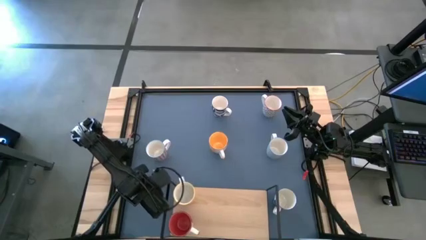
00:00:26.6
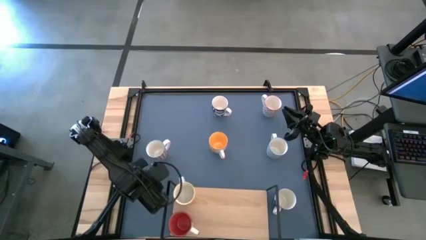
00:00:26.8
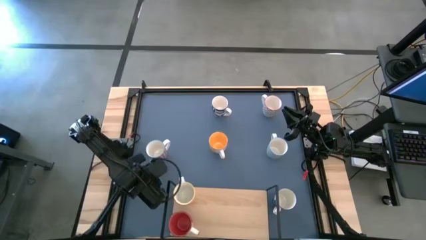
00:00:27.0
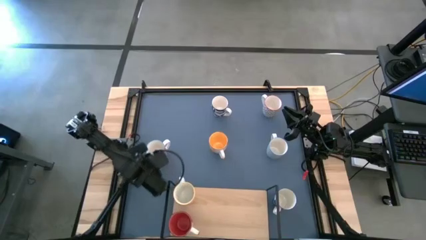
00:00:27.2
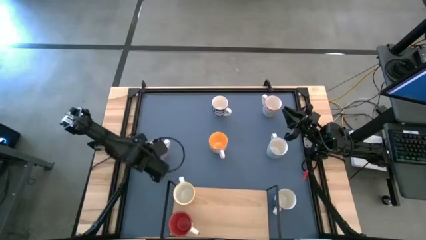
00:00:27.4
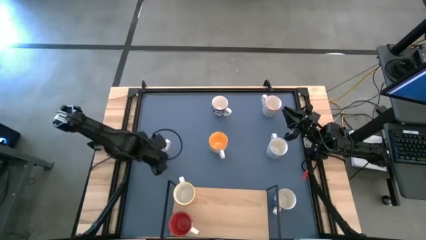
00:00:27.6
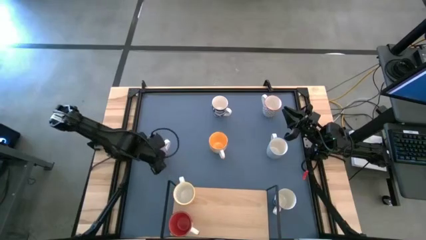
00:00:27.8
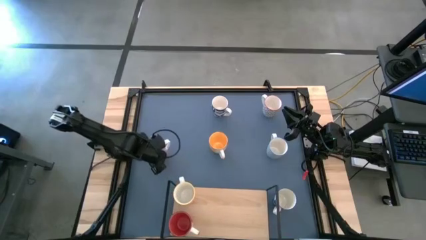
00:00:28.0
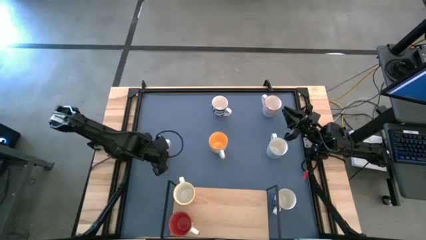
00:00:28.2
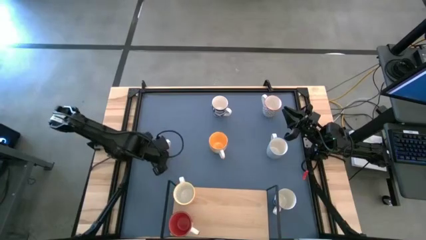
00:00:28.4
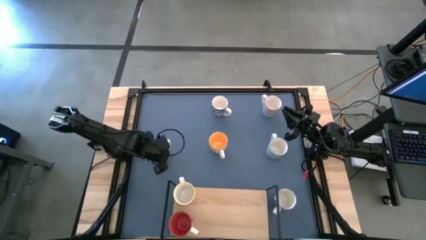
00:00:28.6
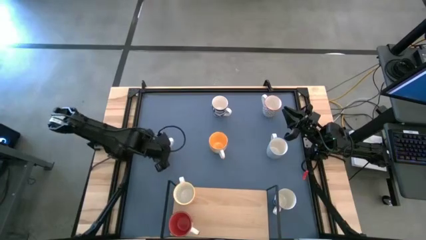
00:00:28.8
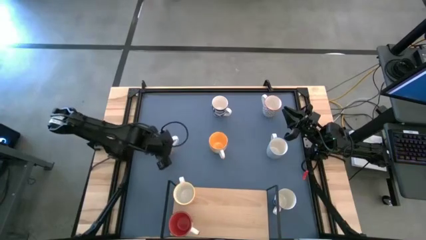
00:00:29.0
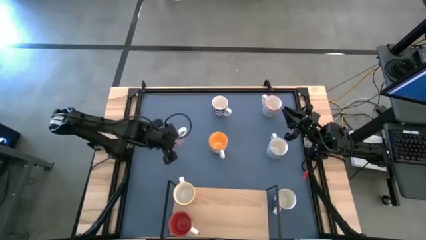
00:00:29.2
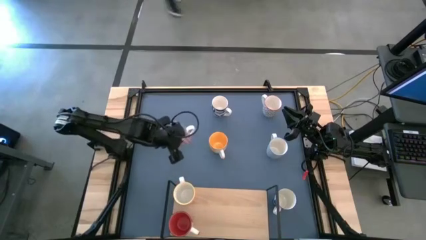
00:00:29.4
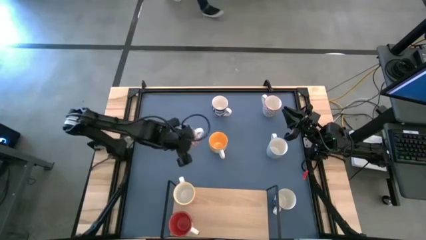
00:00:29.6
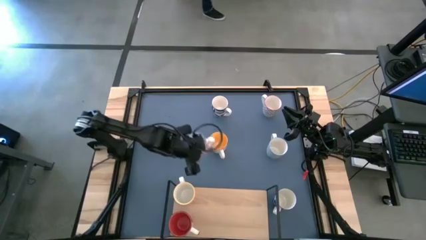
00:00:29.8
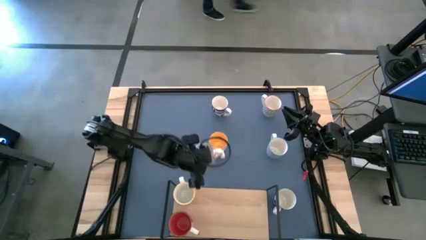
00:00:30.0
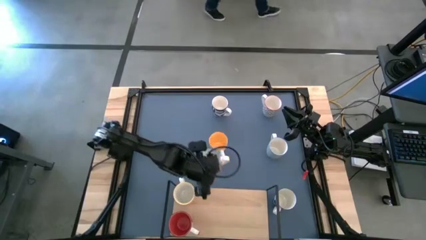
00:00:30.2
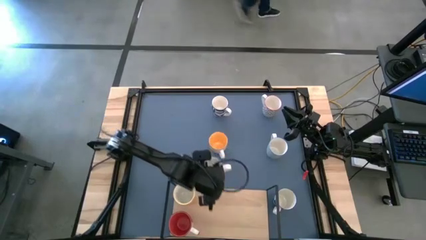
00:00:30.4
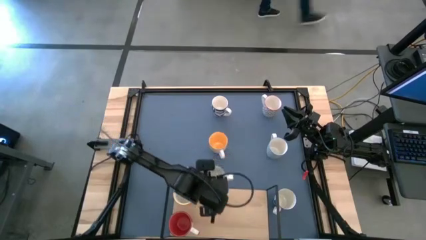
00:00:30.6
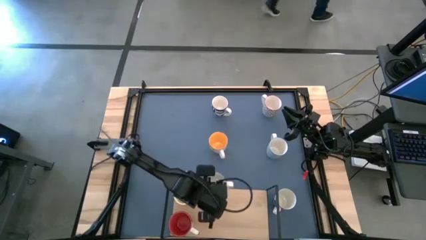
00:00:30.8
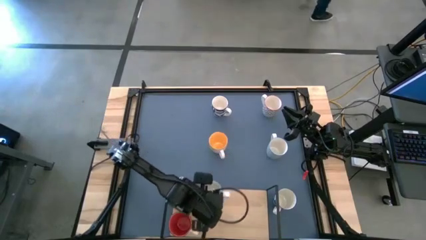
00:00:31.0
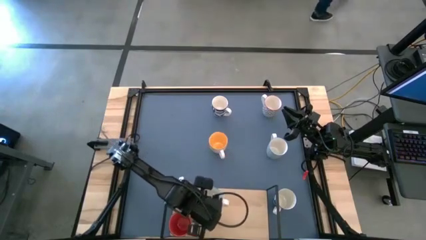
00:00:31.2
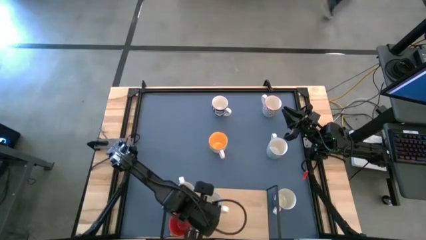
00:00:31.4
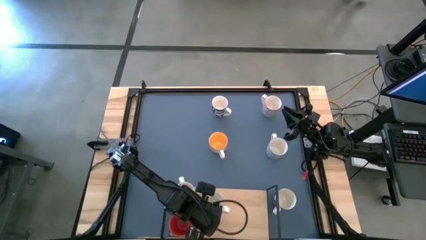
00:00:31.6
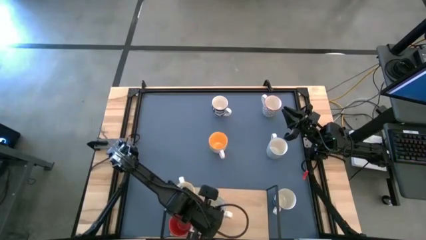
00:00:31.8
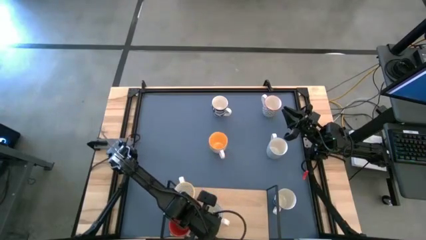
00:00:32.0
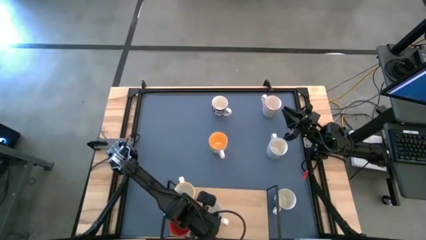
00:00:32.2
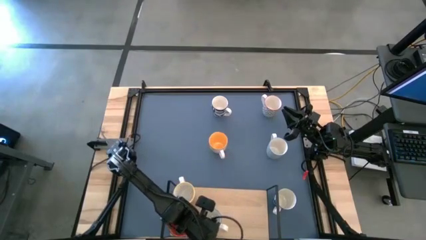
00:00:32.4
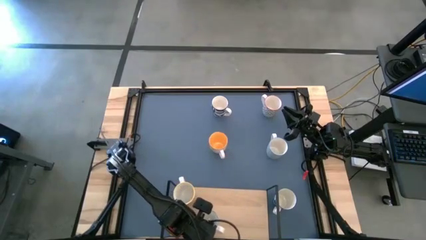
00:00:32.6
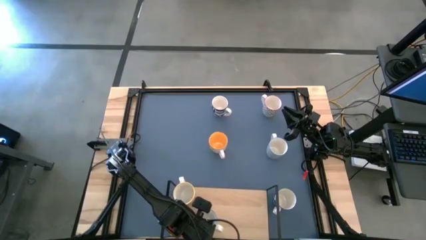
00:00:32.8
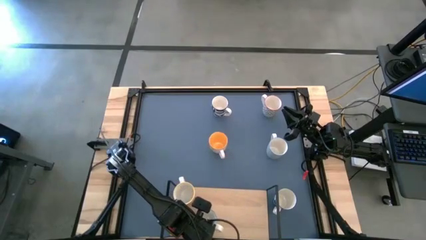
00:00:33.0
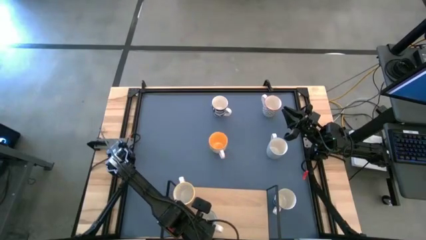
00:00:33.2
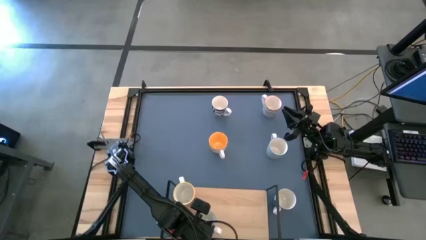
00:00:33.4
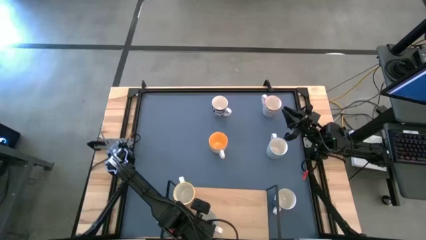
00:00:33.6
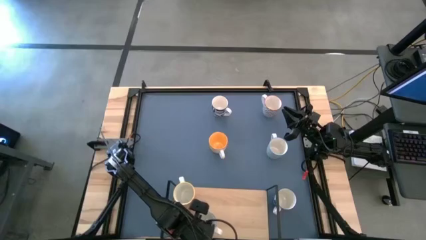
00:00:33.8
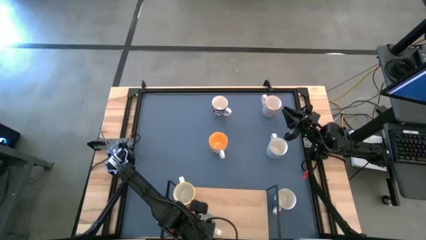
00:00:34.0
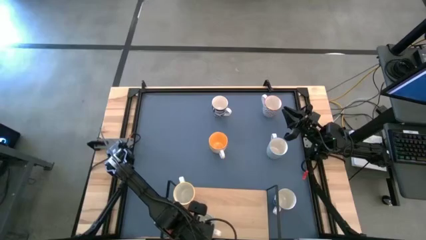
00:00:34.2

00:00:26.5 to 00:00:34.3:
Task: Place coffee mugs
Put the red patterned mug on the shelf

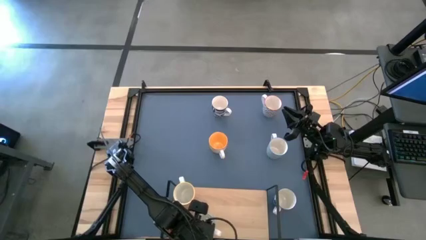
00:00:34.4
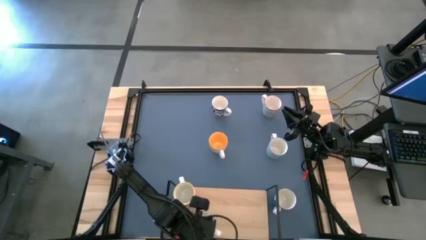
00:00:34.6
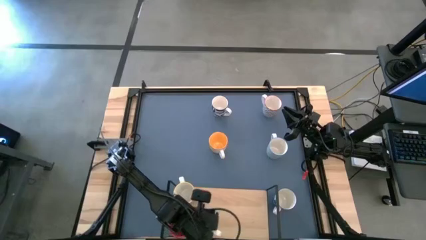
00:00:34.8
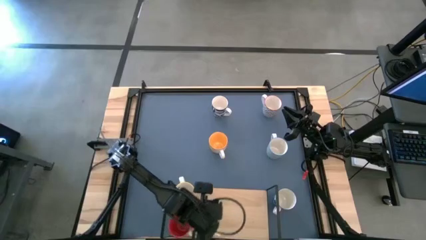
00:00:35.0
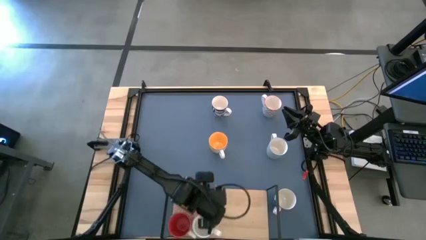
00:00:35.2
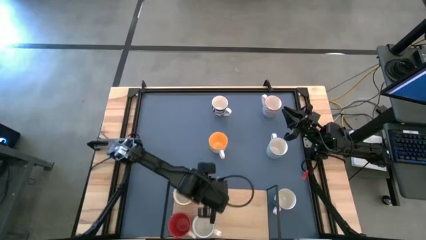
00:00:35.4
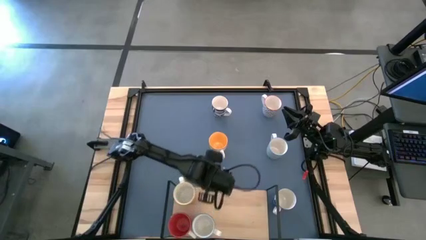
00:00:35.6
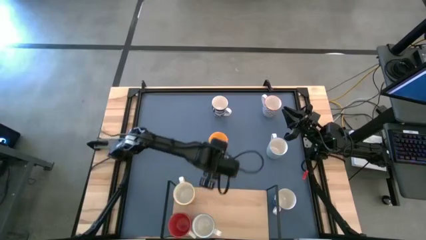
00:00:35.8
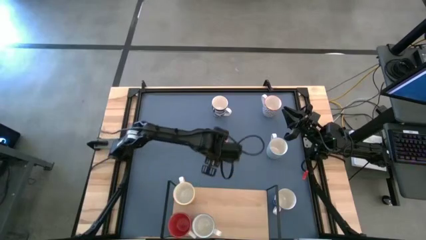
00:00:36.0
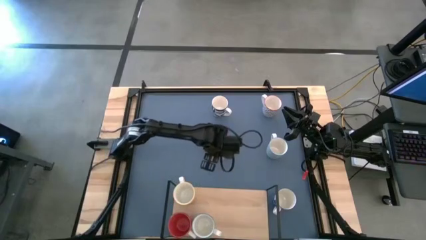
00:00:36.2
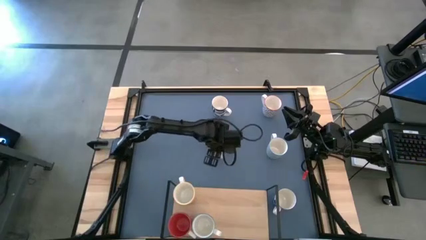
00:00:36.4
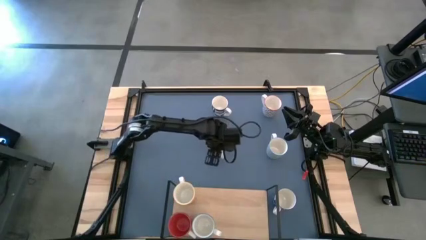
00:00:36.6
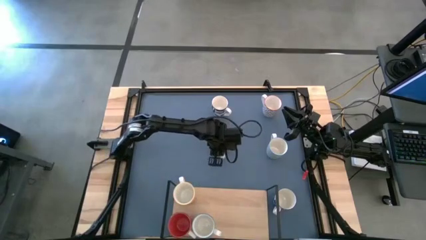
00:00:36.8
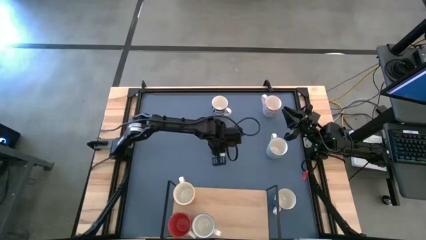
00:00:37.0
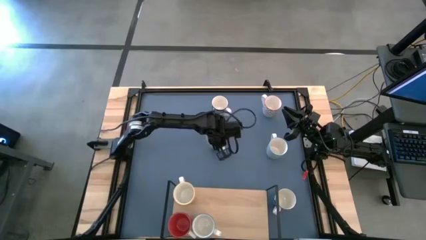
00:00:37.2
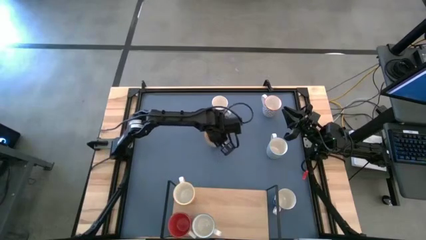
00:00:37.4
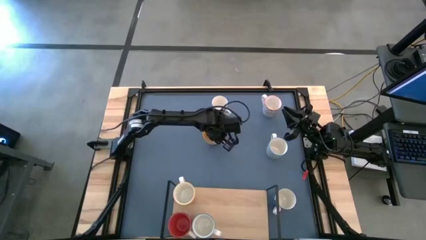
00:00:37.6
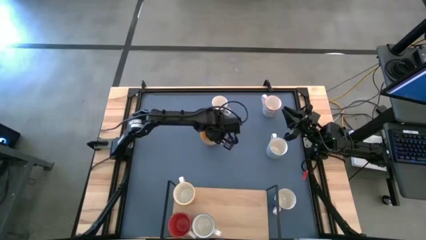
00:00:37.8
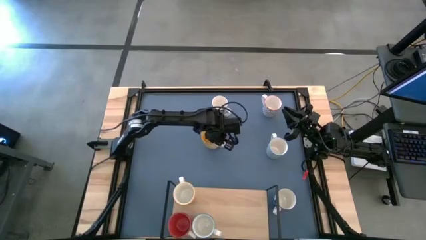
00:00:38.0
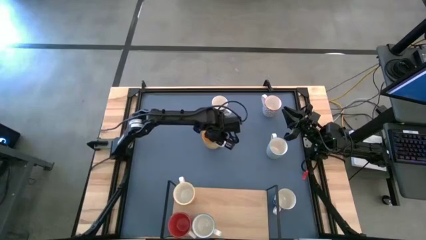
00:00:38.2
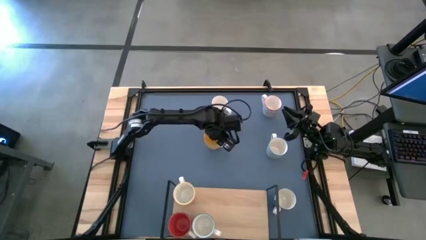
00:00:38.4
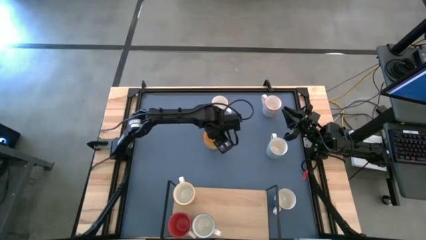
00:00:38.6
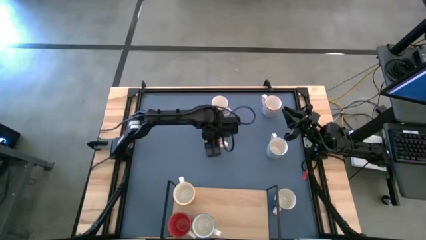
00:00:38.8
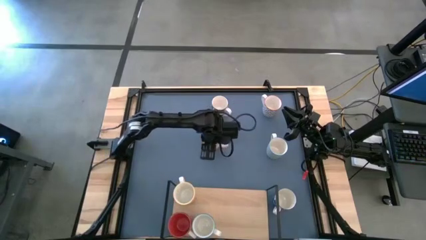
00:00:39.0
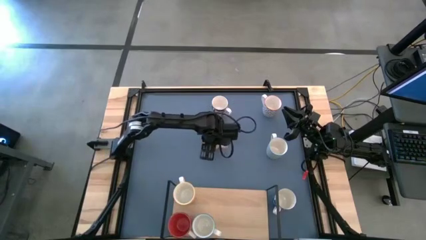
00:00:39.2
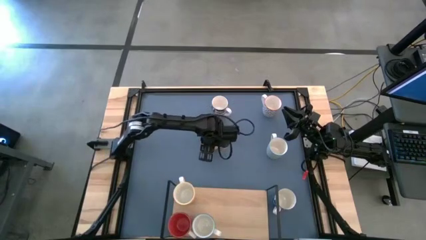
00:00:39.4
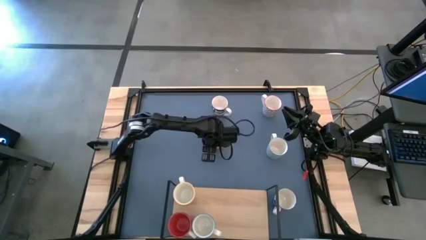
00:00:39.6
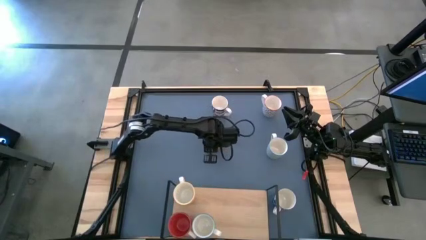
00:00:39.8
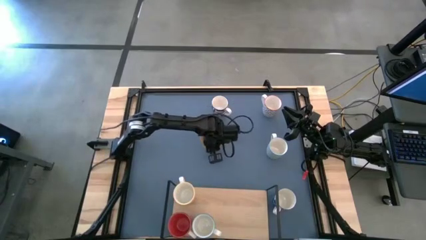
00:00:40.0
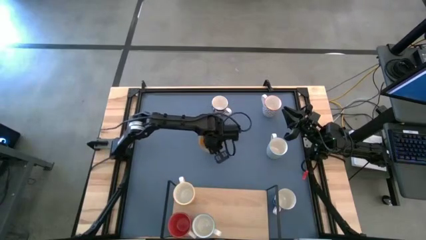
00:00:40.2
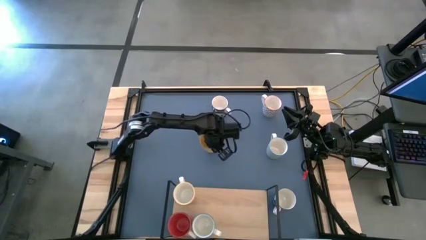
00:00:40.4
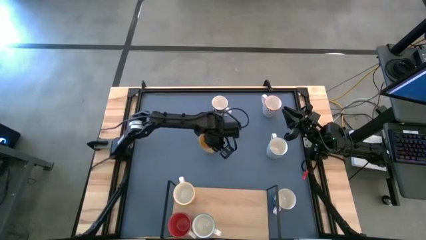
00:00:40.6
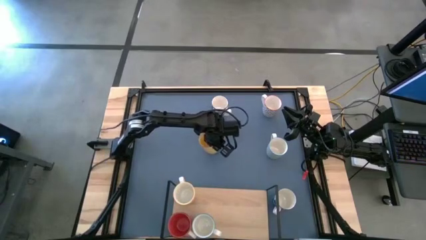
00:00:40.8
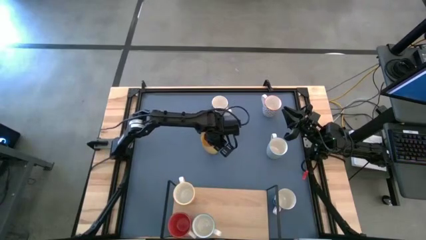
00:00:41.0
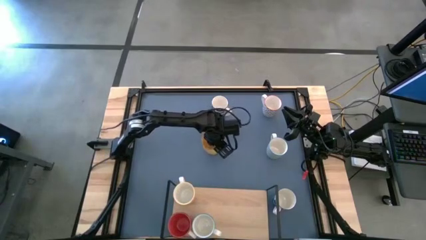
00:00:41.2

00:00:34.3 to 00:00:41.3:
Put the yellow mug on the shelf
